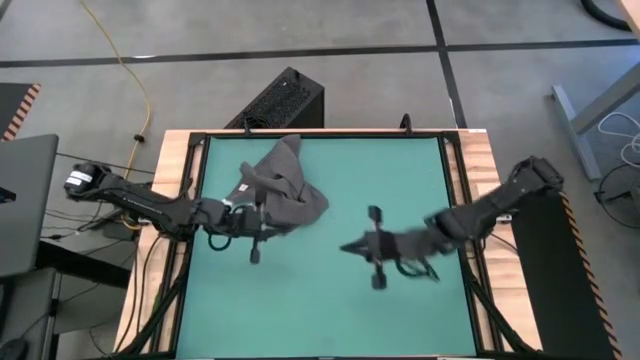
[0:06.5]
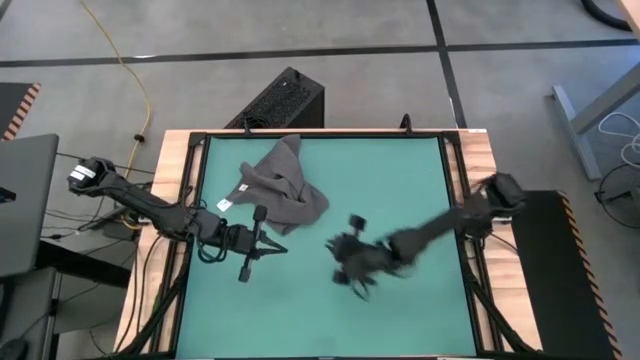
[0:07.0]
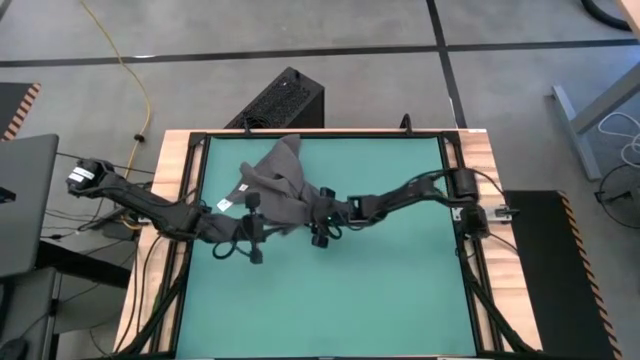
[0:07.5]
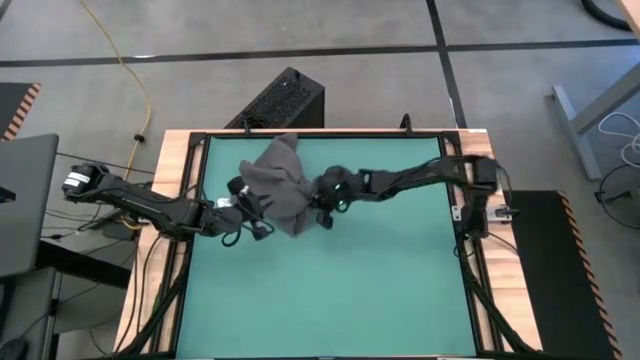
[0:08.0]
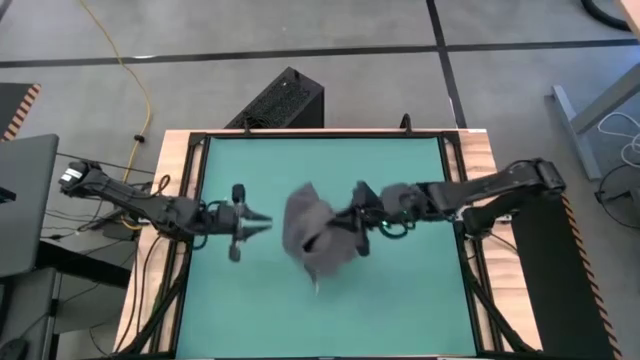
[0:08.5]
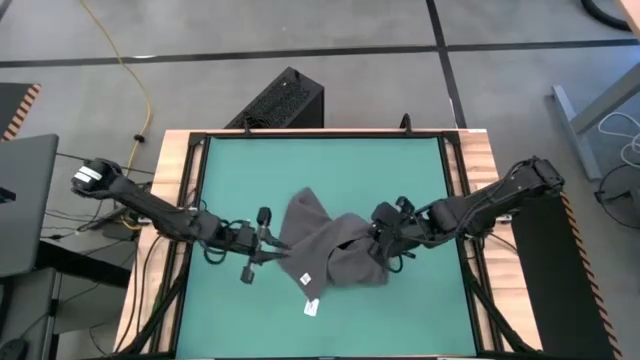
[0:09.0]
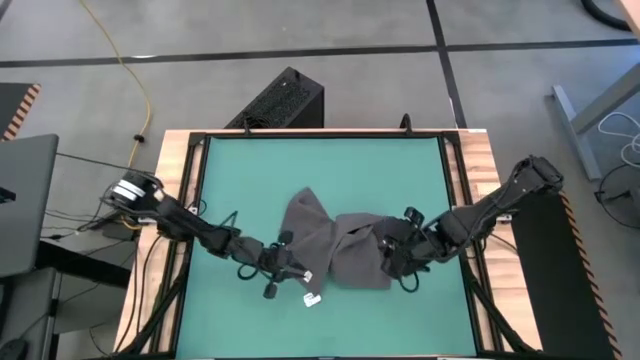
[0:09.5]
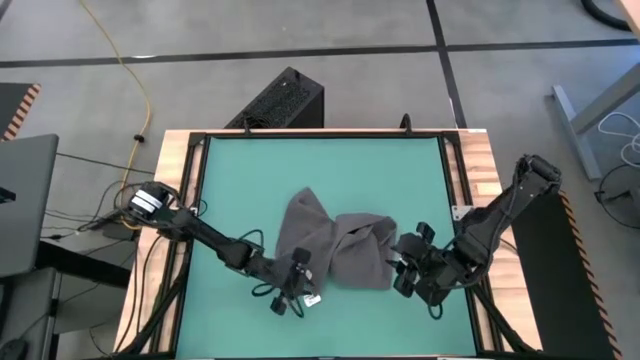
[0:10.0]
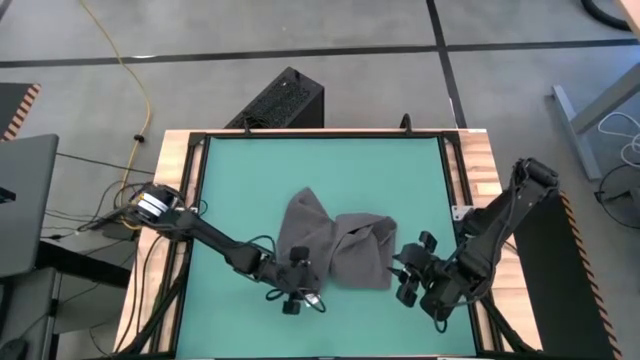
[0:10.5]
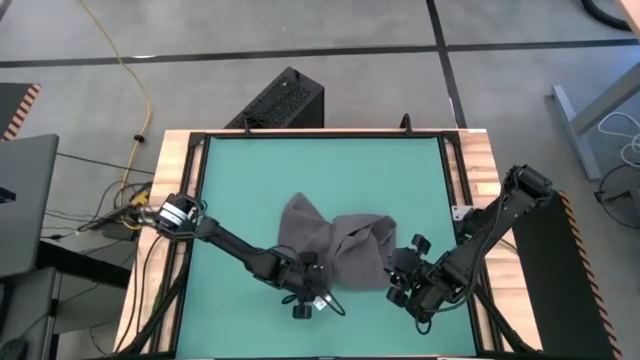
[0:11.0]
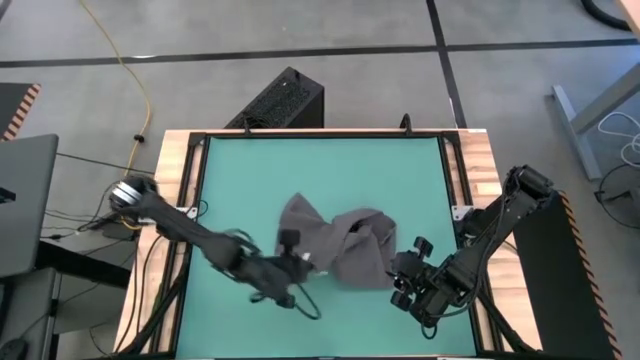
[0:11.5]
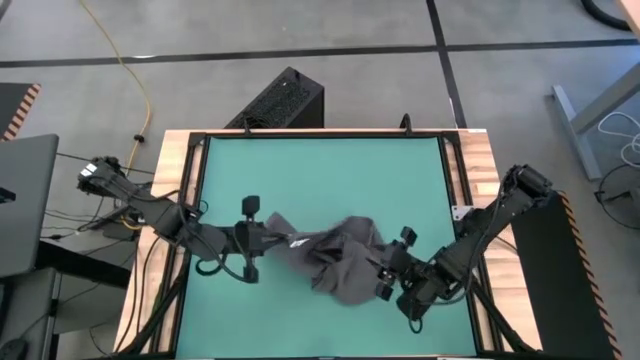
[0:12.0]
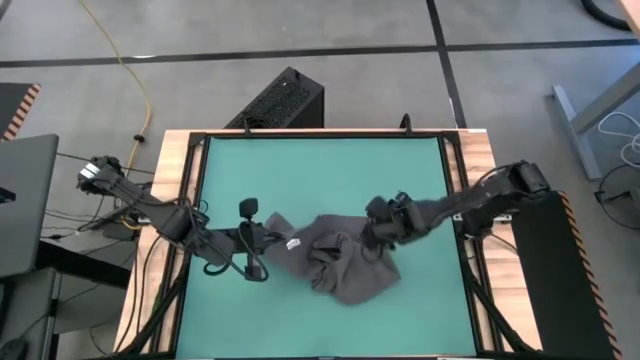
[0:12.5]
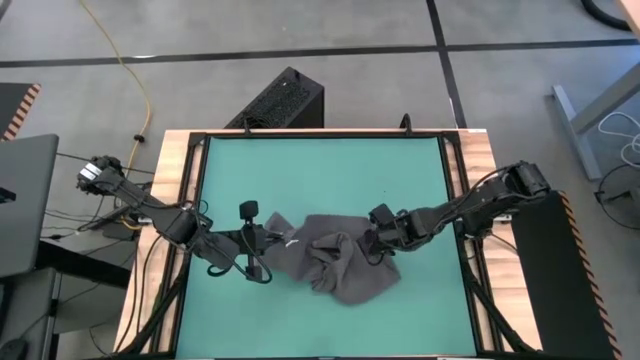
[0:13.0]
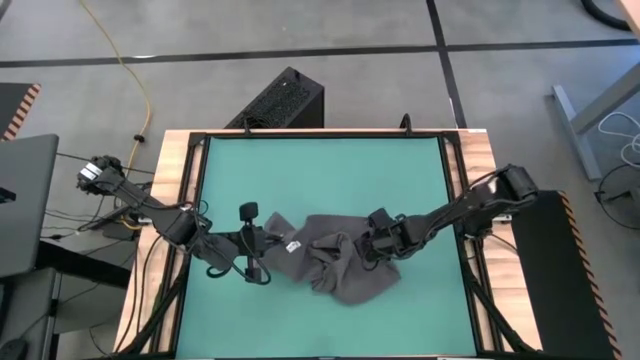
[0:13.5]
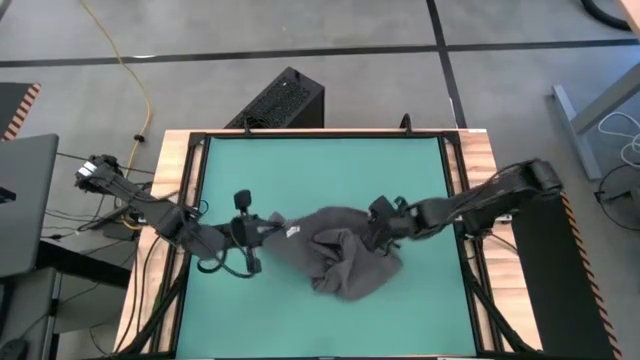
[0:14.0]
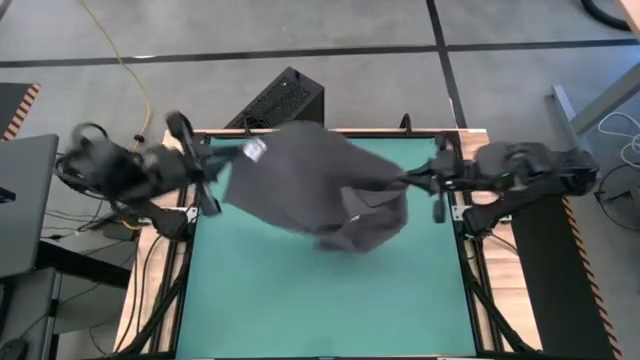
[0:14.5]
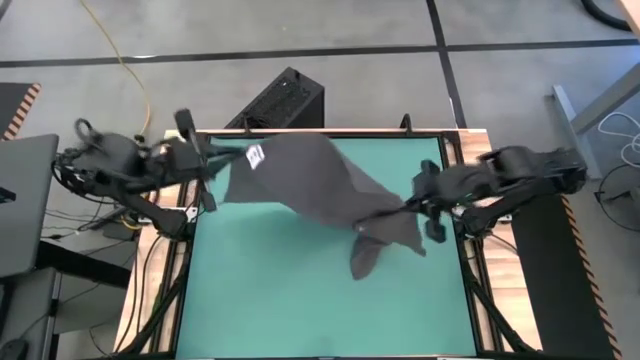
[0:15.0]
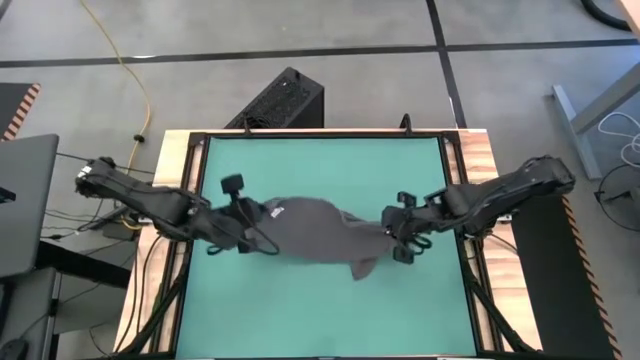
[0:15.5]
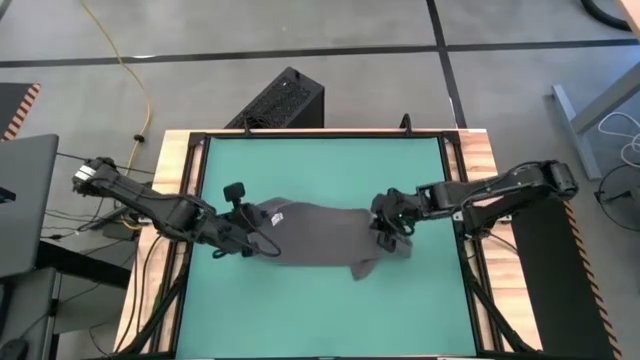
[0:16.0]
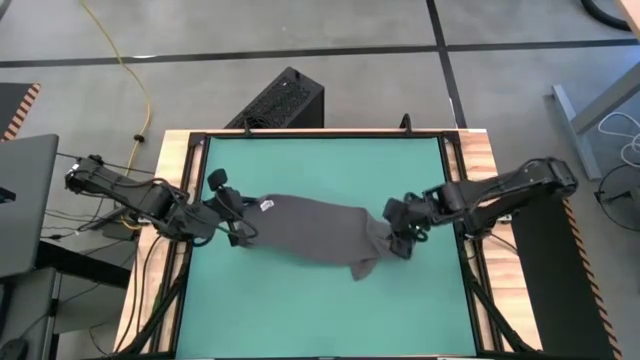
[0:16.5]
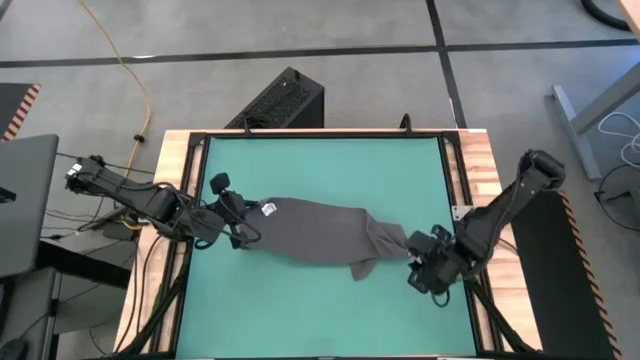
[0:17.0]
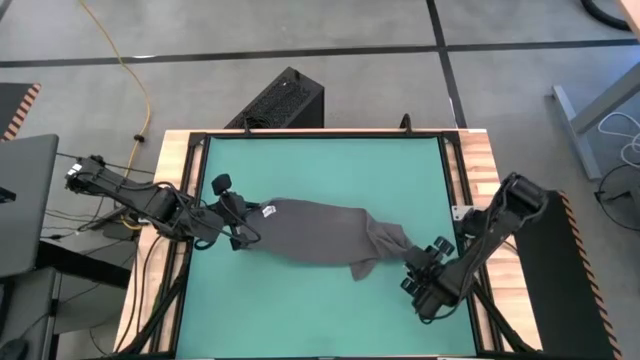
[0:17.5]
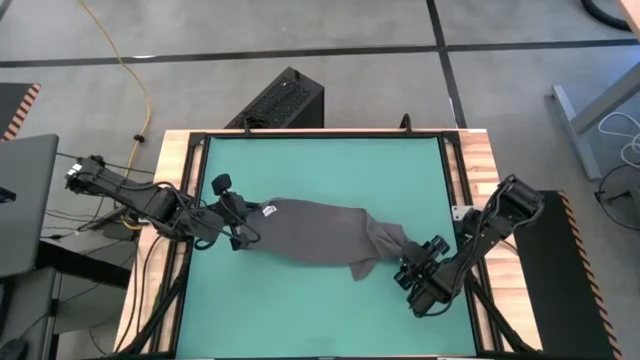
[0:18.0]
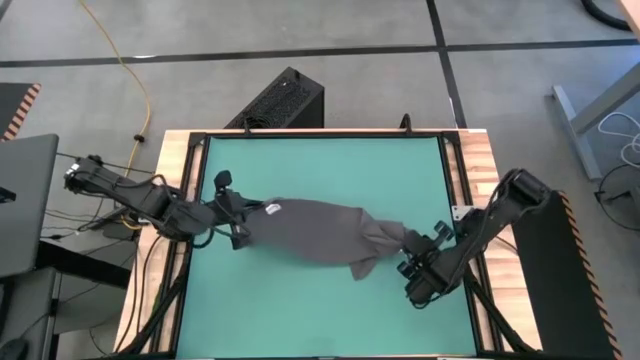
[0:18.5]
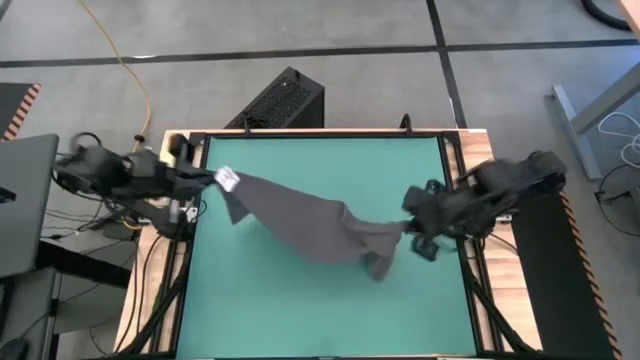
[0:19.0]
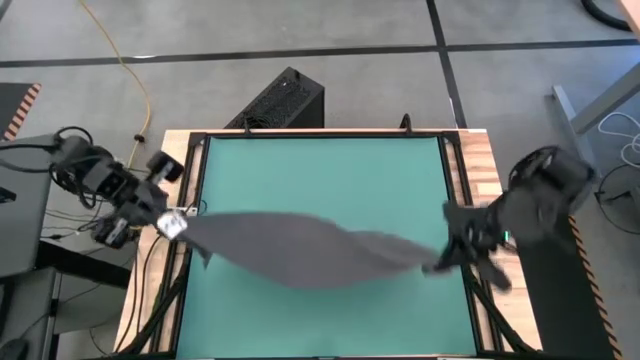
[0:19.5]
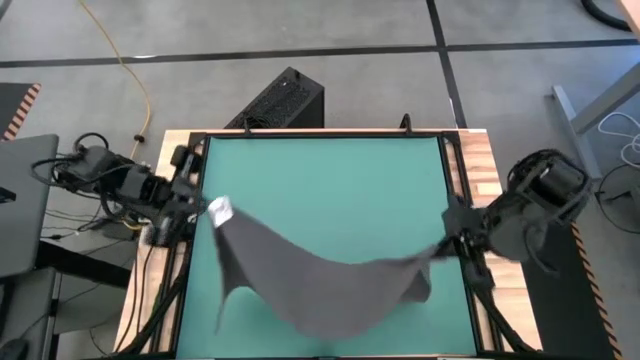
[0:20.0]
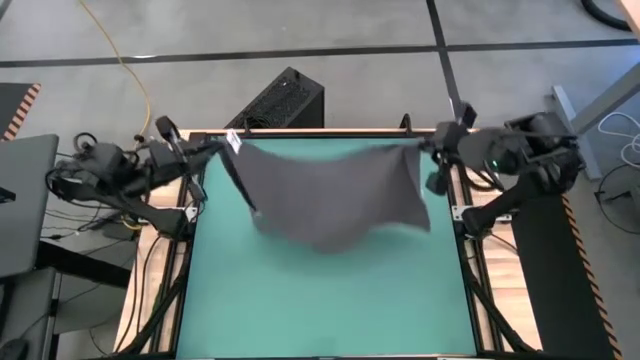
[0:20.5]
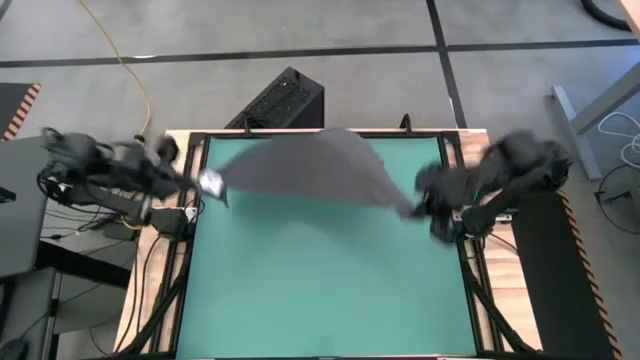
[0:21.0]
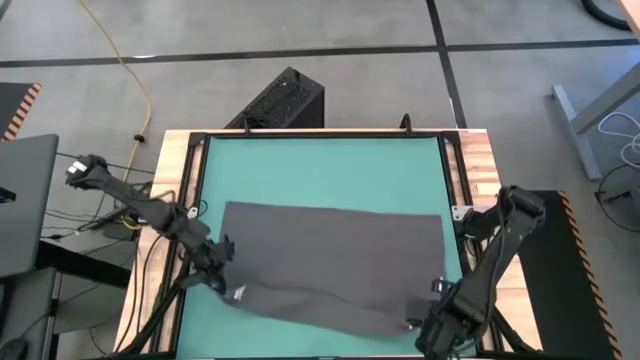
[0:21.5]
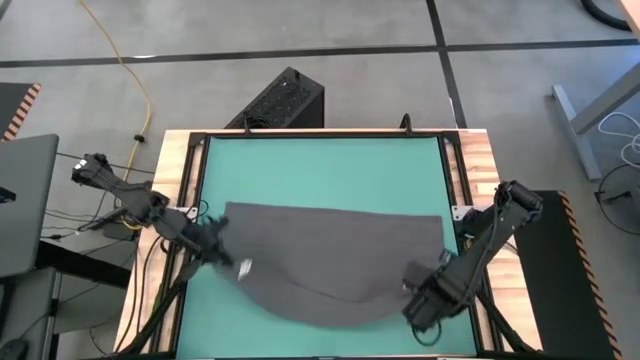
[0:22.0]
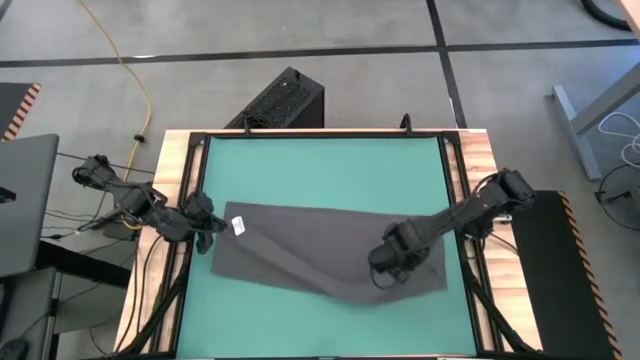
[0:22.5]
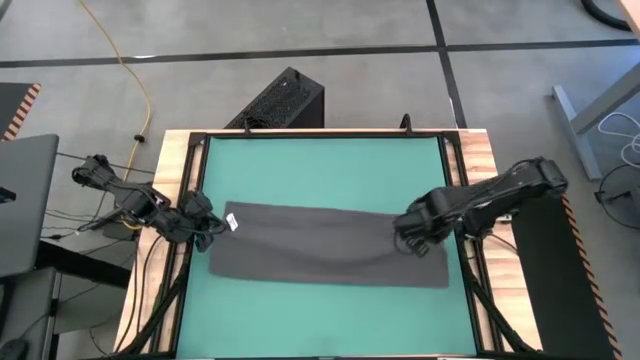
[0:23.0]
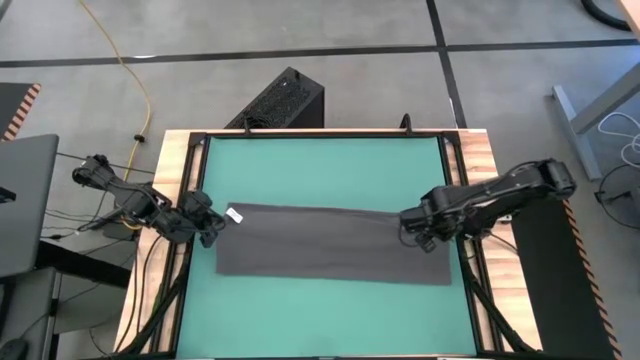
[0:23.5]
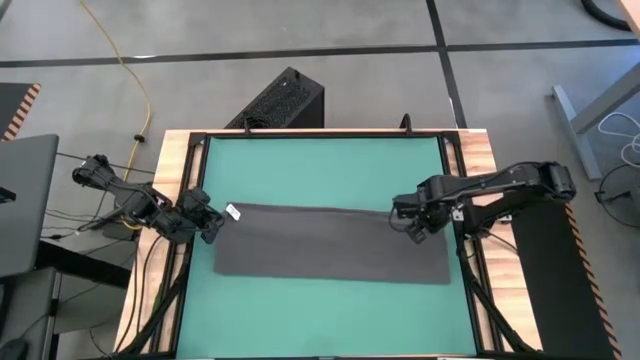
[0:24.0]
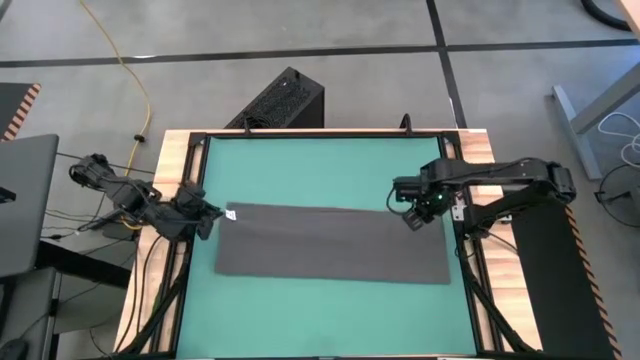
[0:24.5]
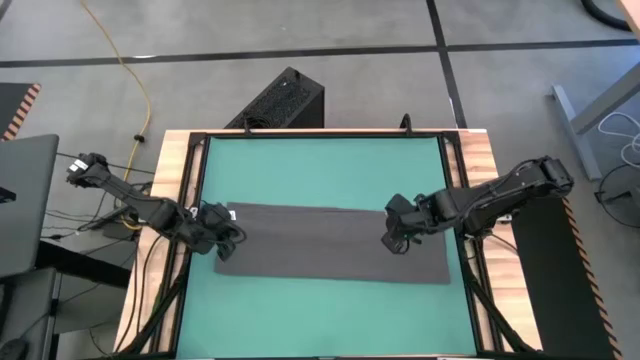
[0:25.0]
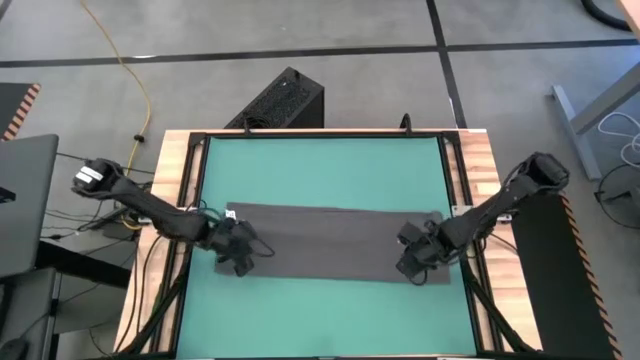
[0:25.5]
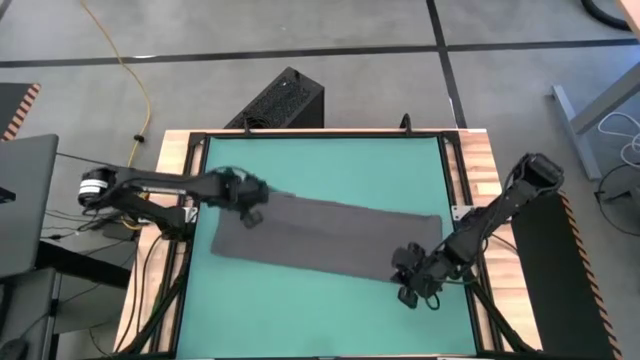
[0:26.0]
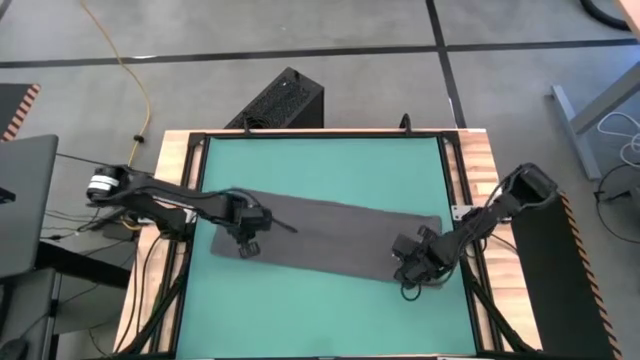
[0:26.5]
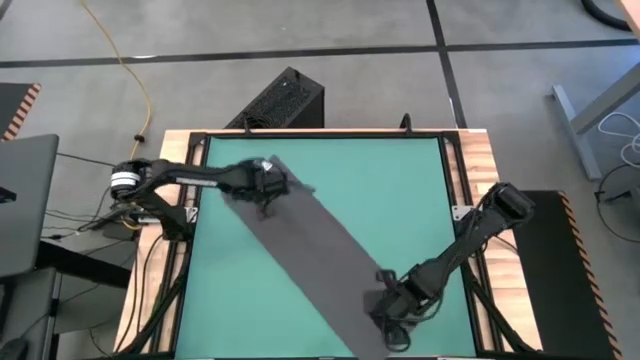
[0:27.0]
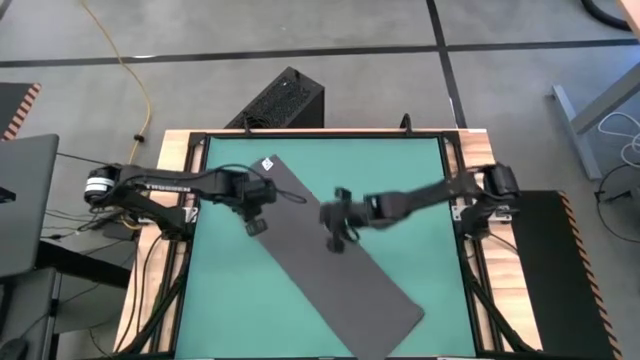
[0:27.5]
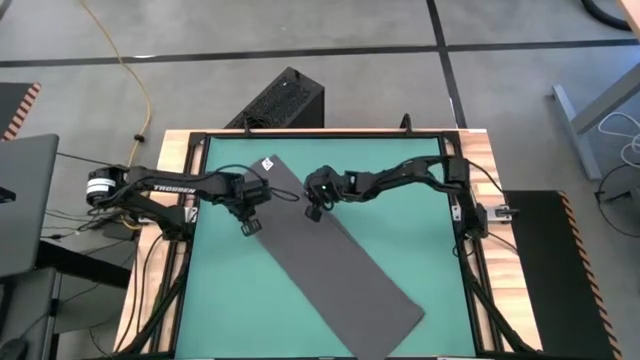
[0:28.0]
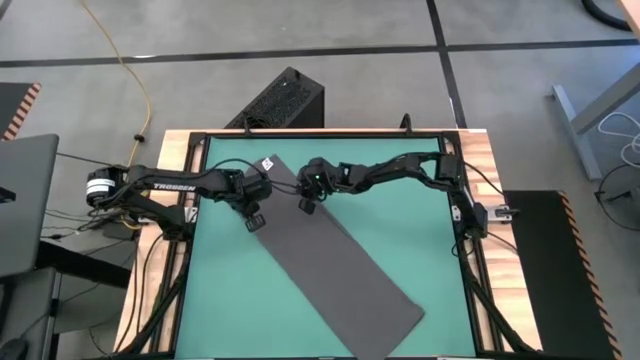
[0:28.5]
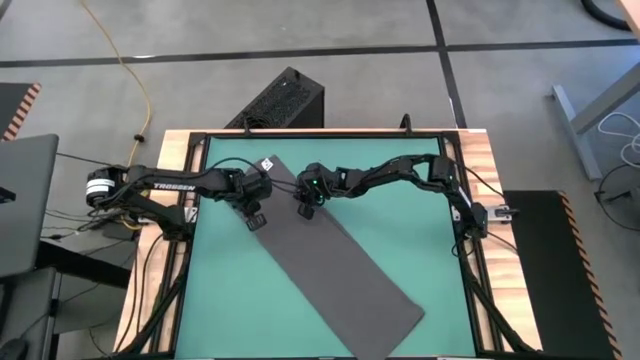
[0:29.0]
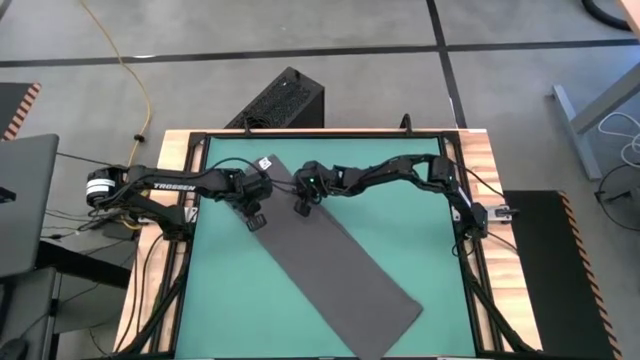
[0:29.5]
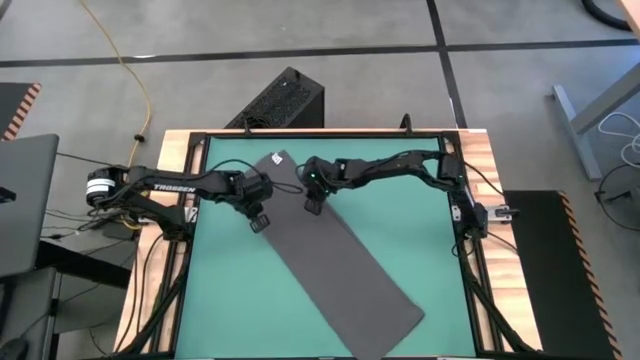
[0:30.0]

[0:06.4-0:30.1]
Task: Roll towel into tight, uniform cylinder
Fold the gray towel
